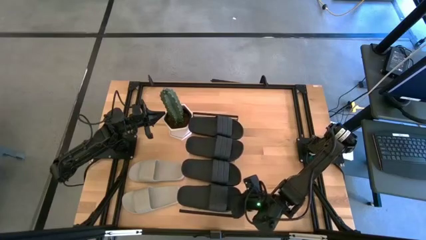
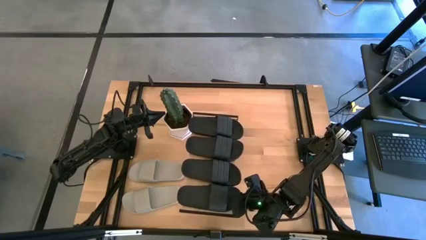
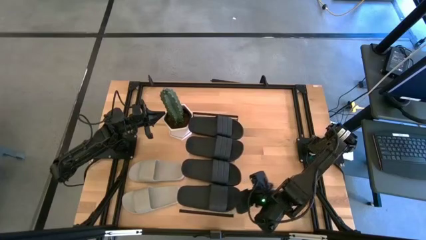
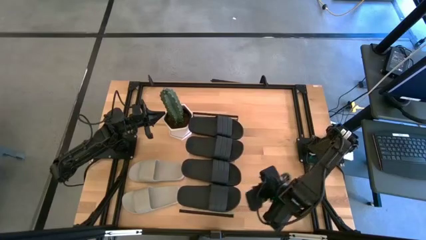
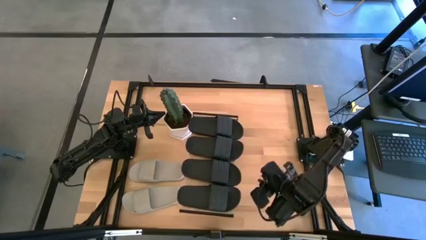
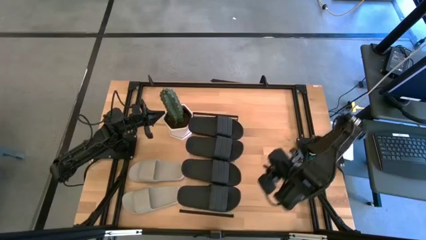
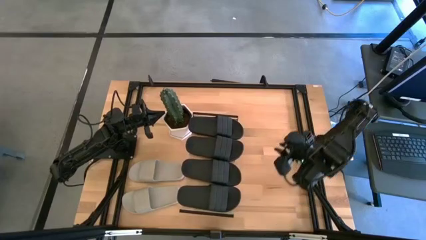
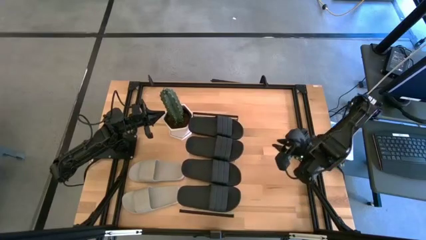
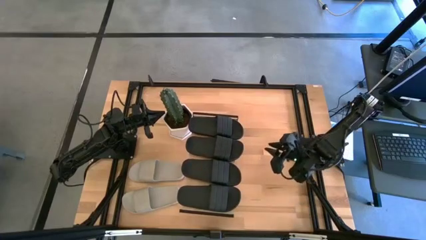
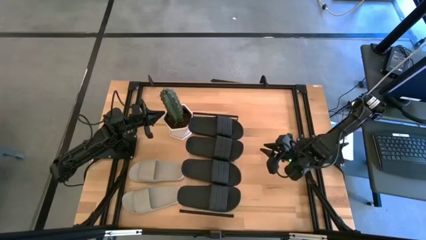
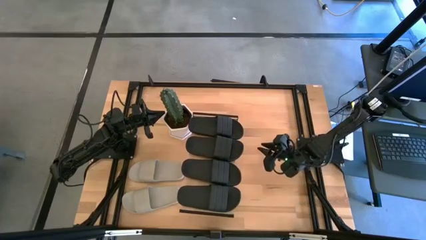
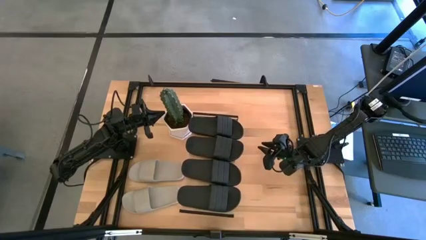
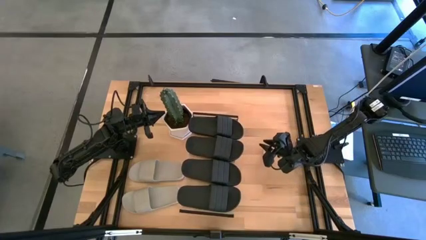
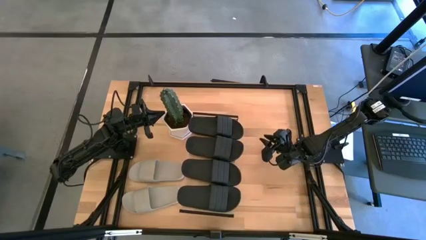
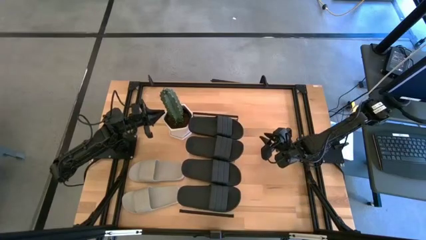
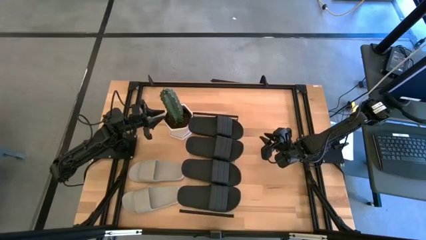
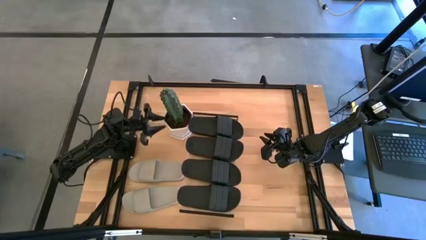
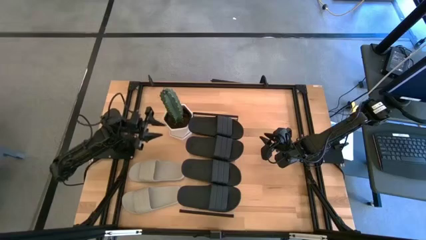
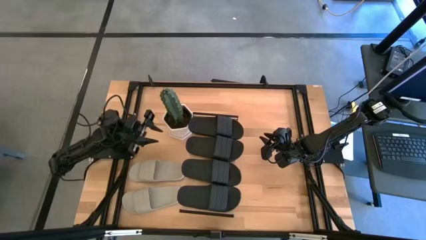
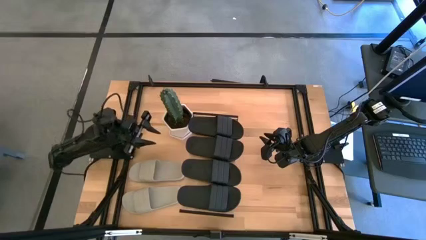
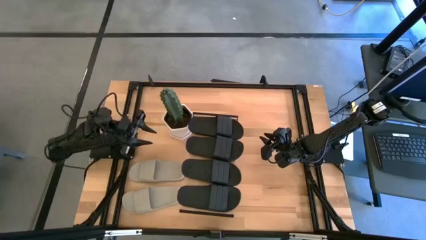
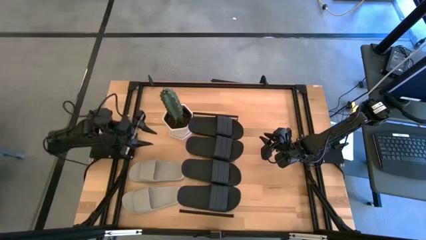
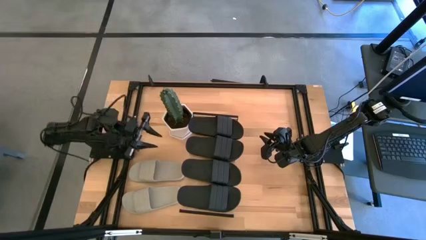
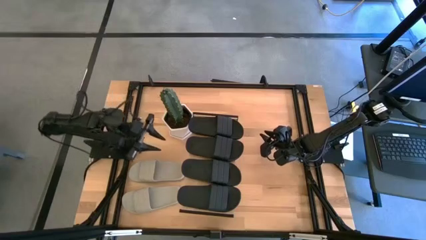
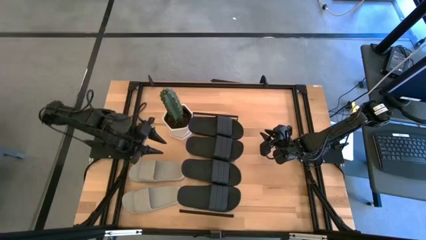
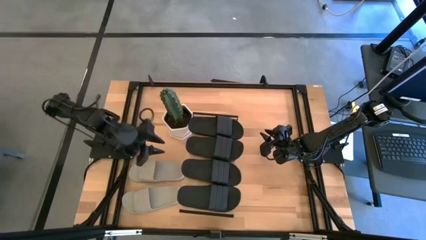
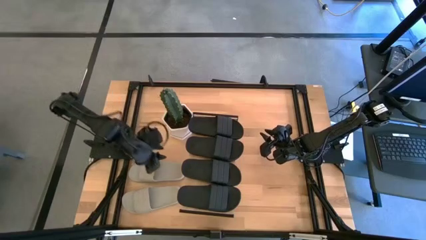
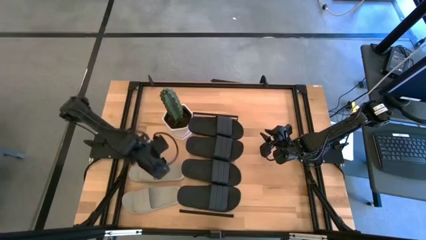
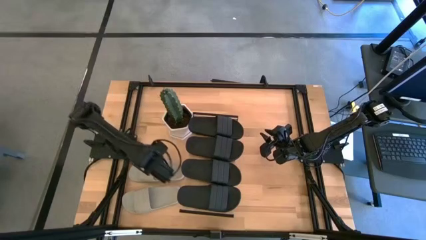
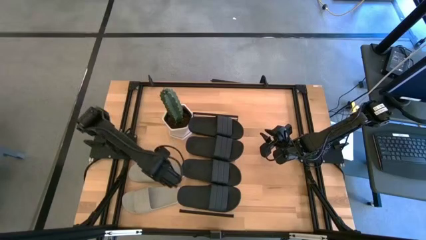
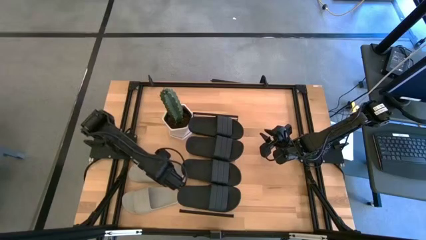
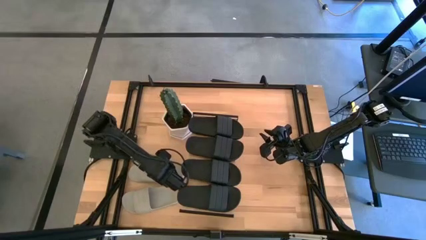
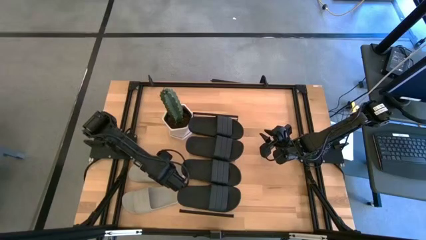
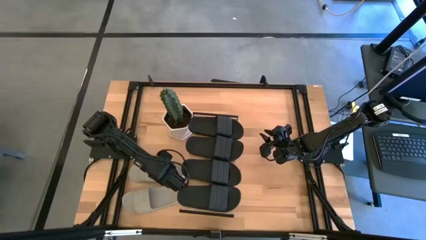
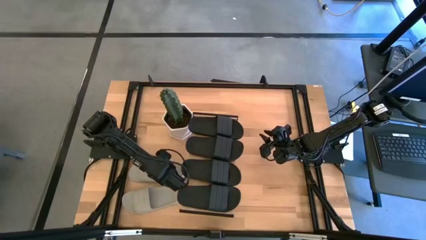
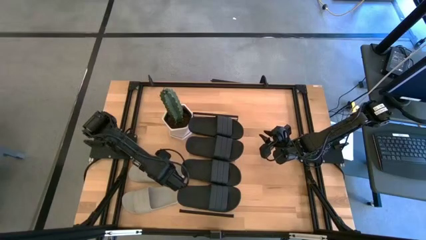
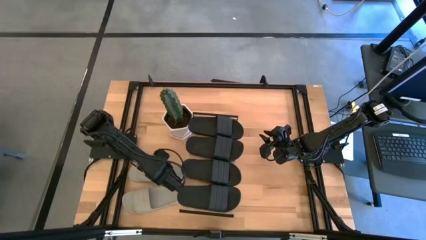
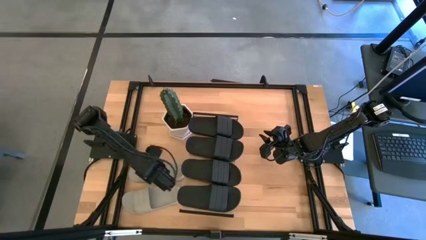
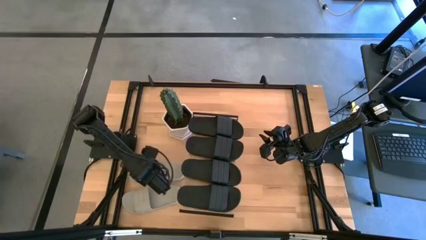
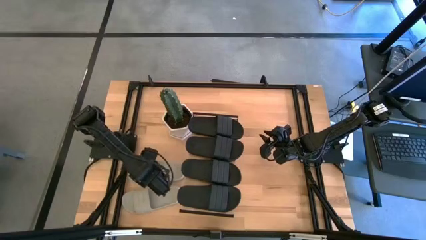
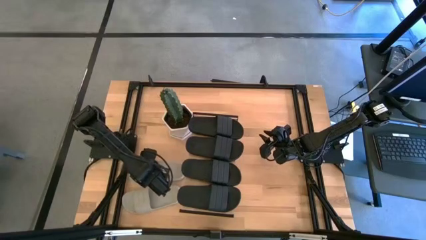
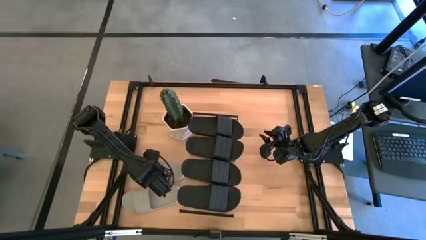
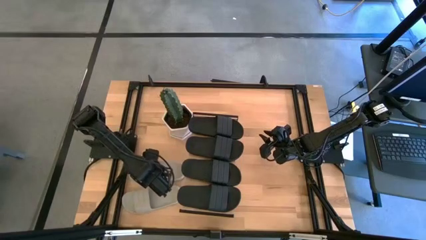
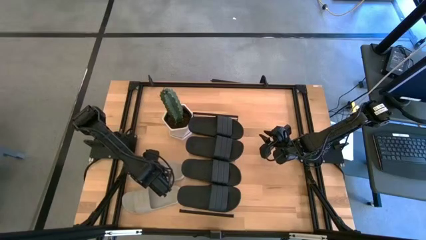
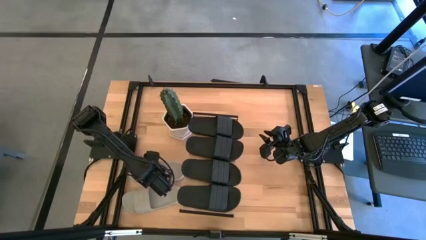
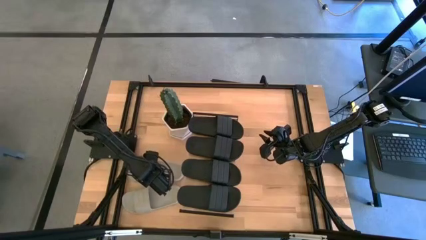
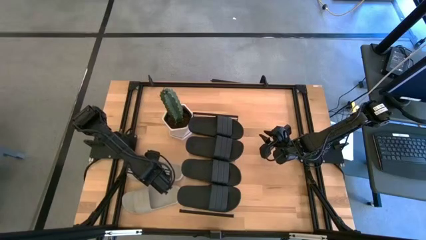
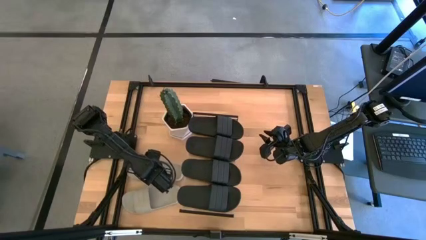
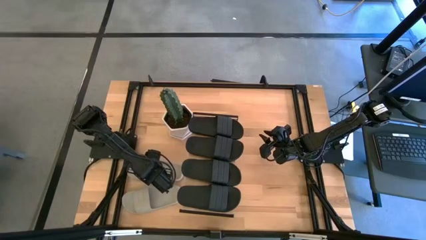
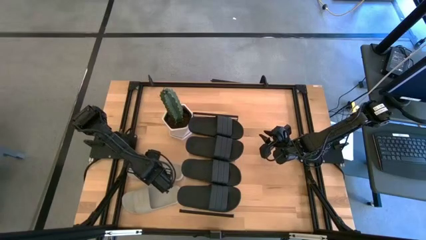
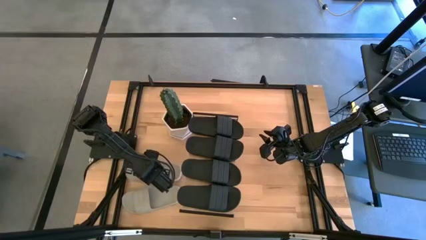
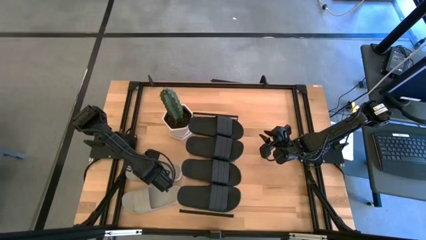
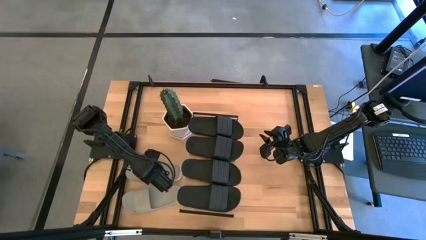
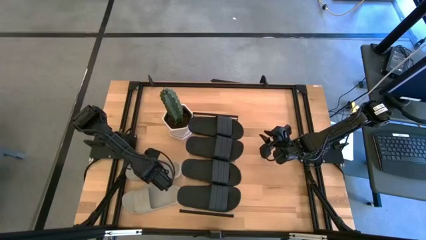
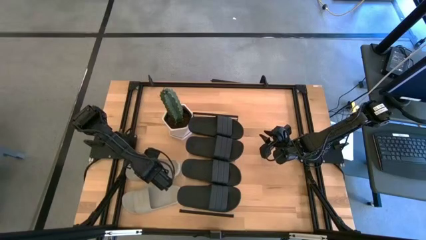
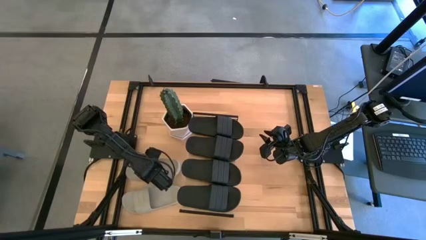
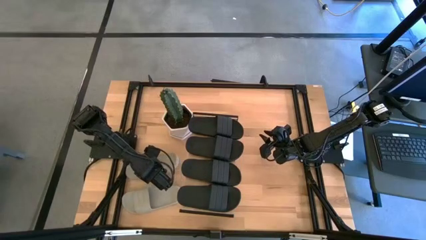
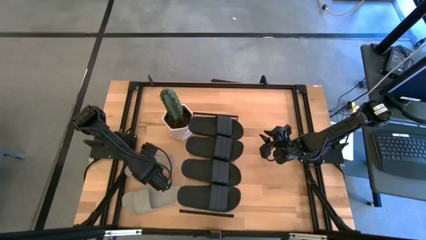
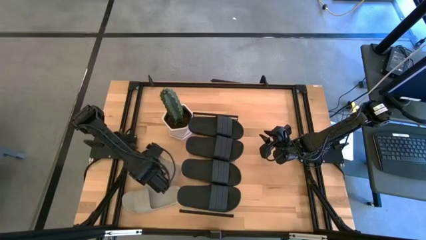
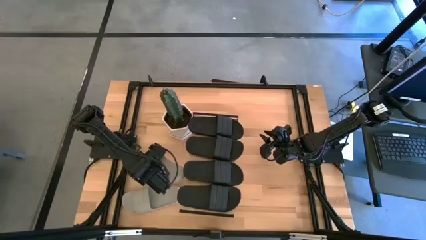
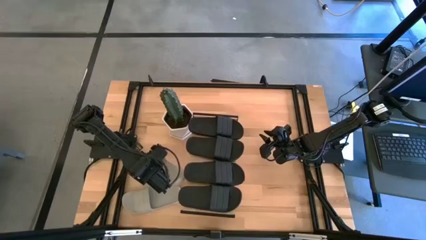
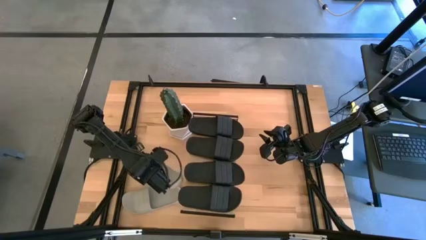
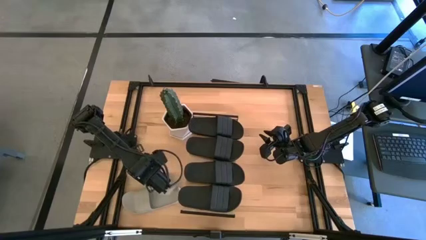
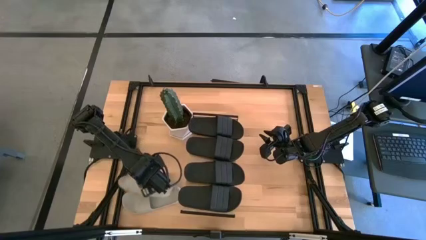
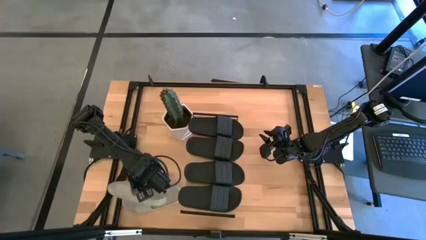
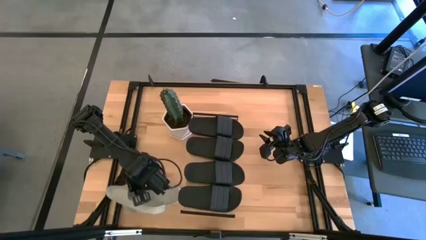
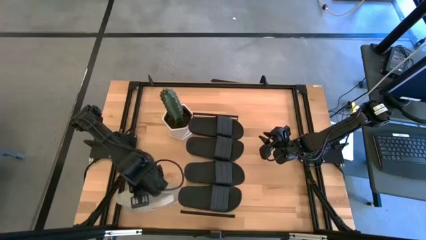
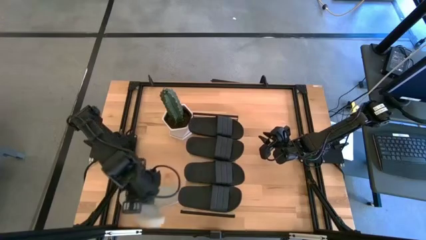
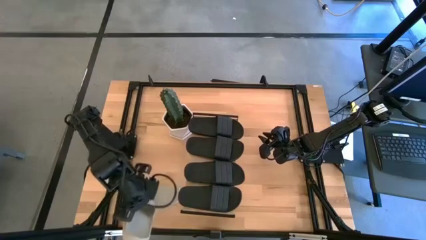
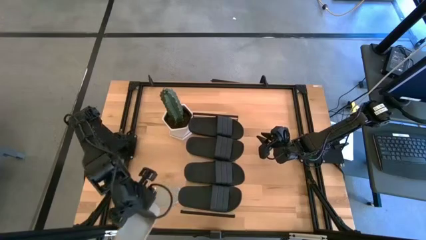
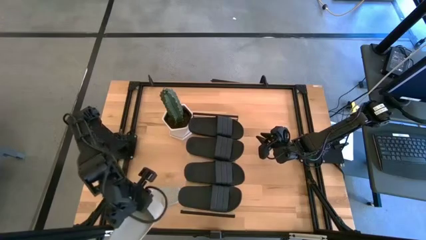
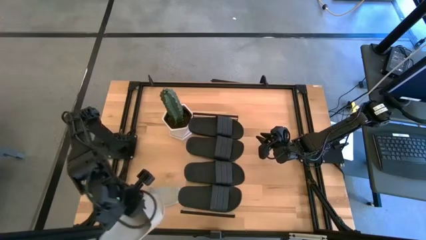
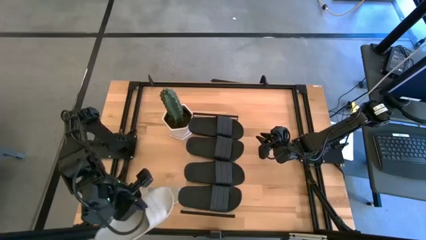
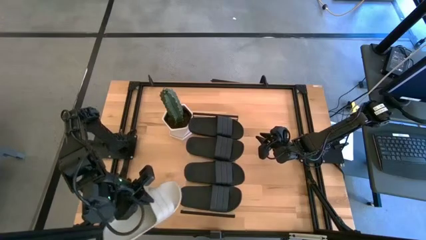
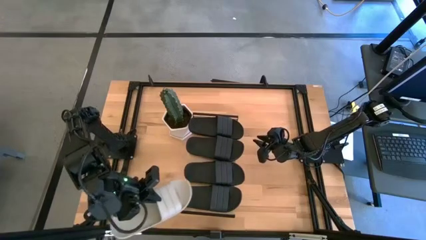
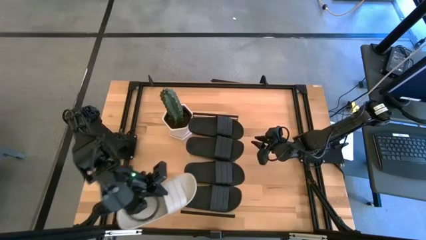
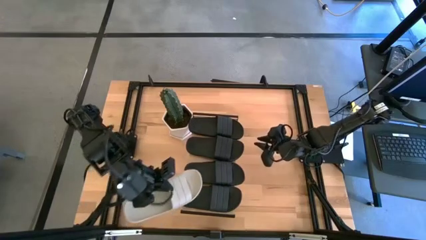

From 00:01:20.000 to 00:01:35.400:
Task: Pick and place slides into the shelf
Put the gray slide under the shelf
